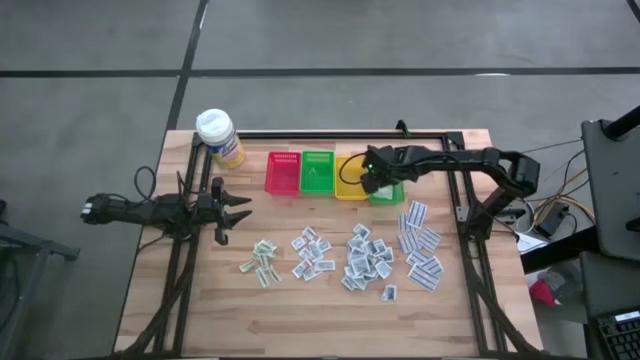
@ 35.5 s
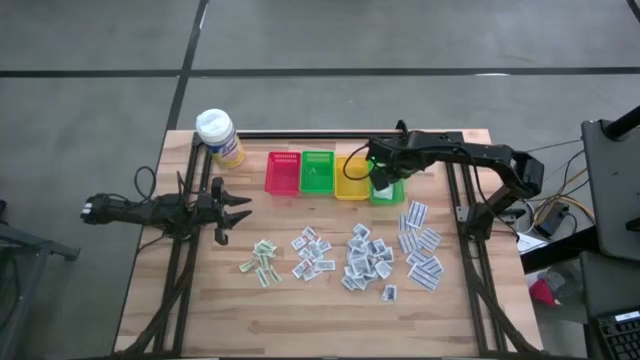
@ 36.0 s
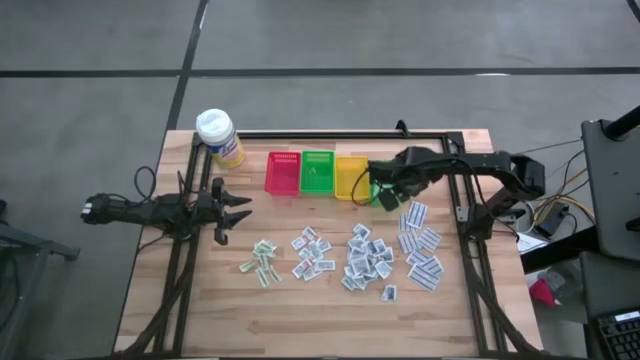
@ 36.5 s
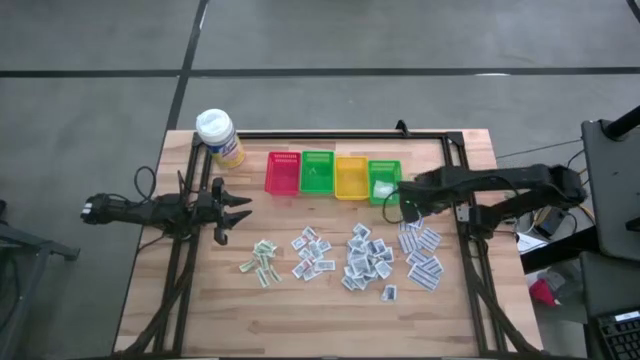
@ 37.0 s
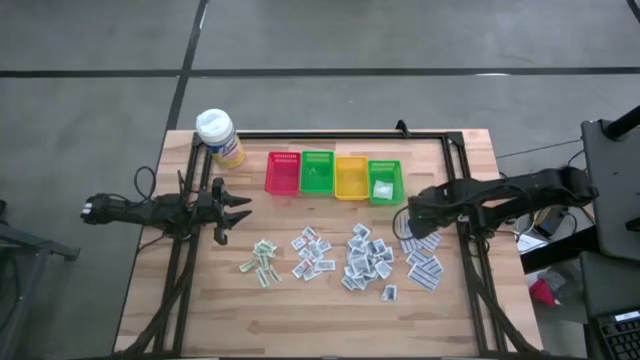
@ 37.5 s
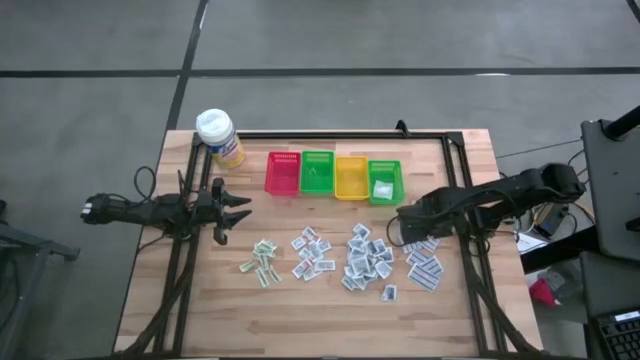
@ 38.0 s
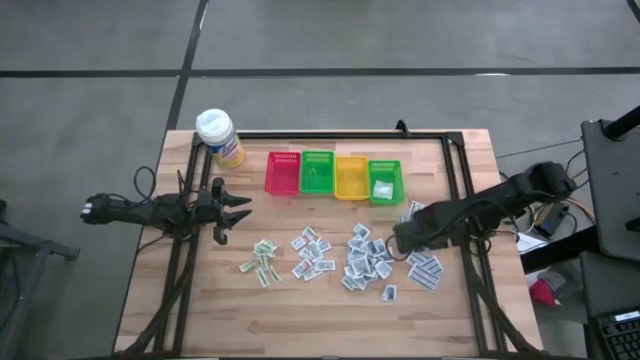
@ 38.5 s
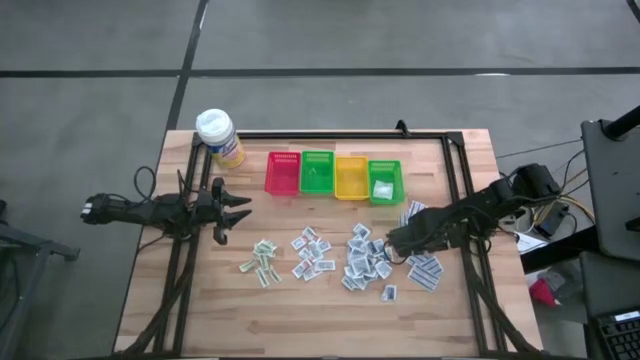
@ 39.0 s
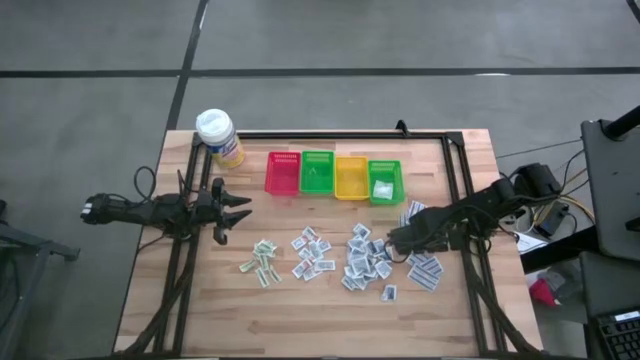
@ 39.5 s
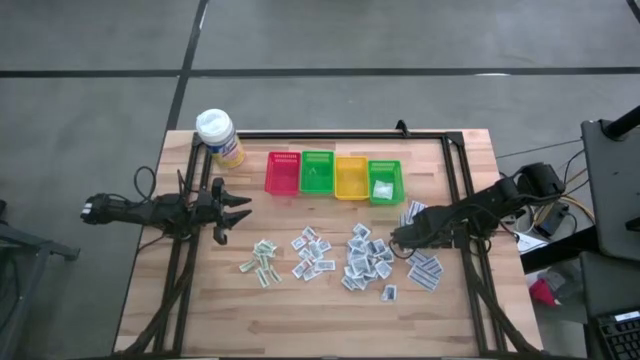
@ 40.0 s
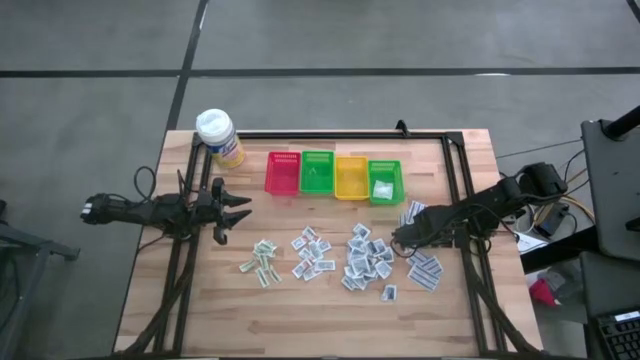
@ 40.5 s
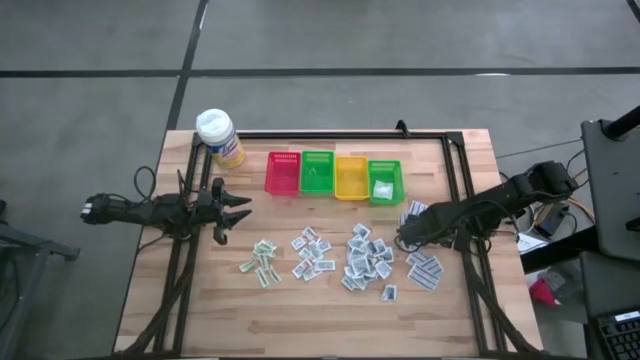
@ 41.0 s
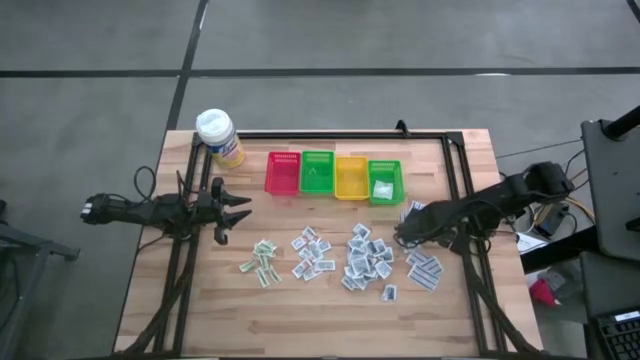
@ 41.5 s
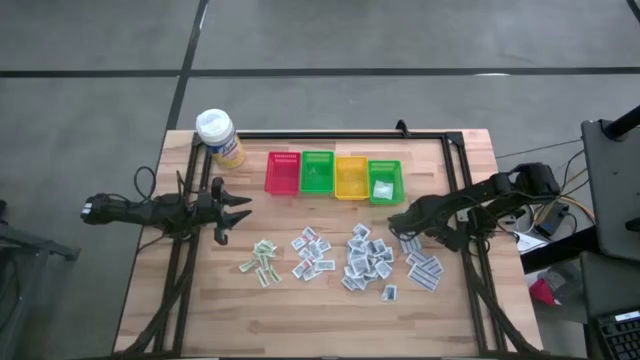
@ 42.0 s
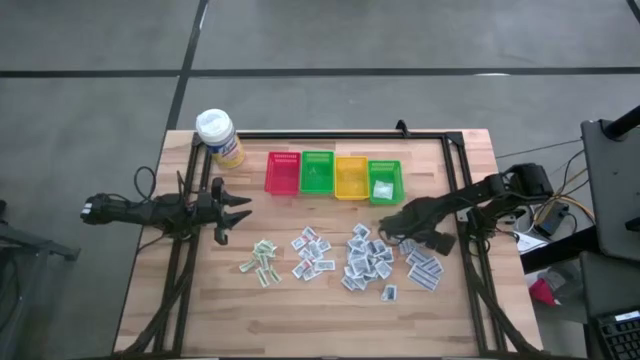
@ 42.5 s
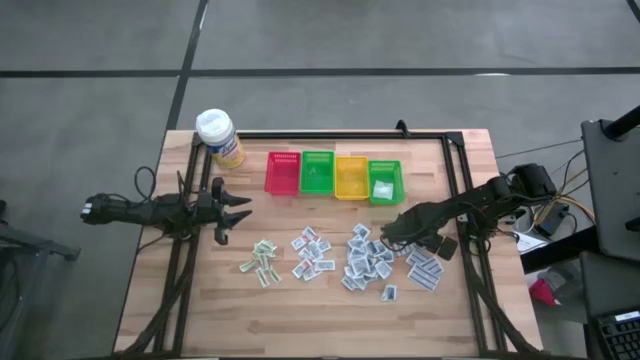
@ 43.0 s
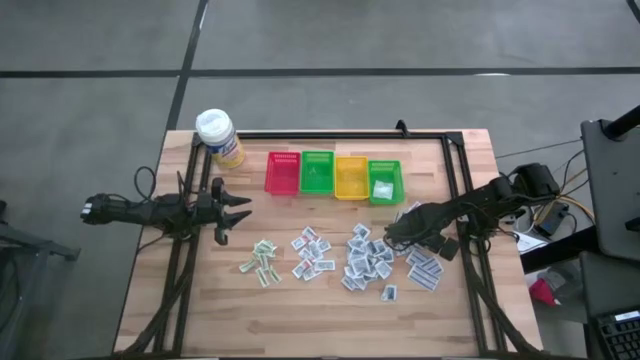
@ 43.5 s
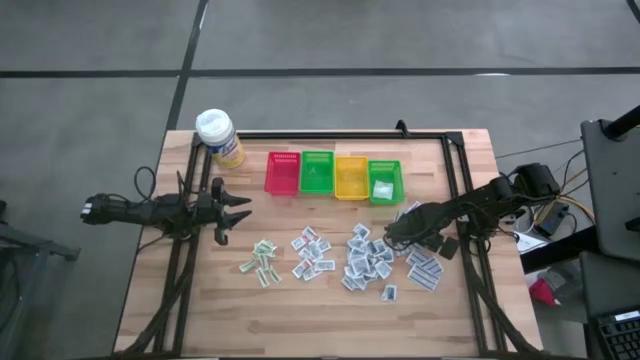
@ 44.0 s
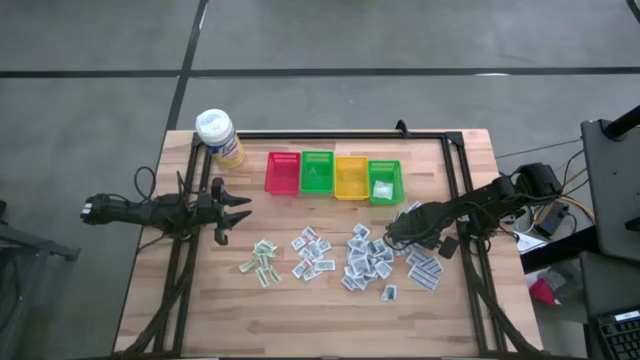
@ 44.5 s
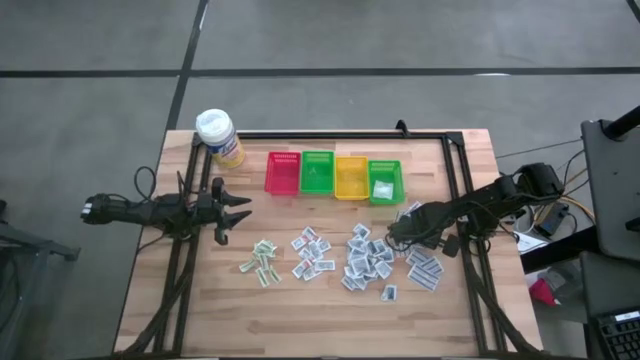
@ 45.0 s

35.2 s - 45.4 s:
Task: Pick & Place First Aid Supplies
Put the blue bandage into the right green bin

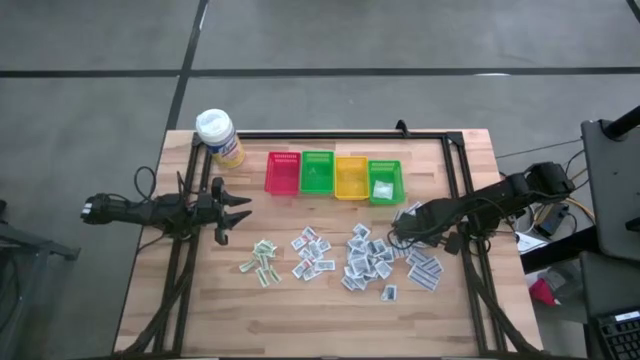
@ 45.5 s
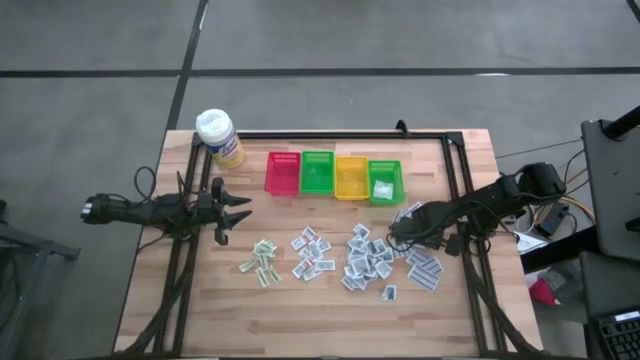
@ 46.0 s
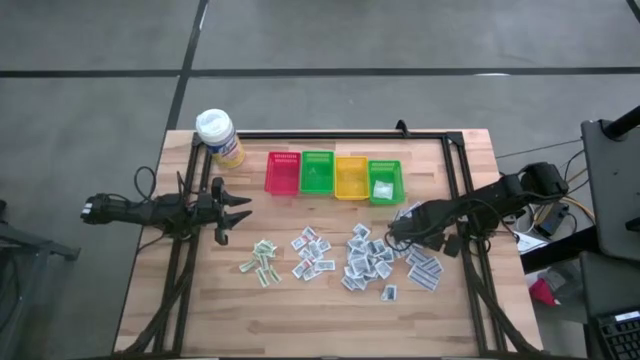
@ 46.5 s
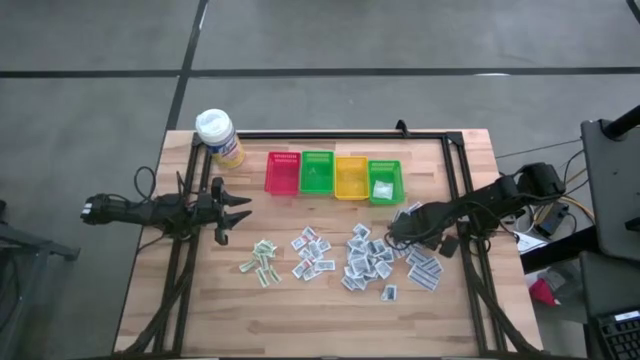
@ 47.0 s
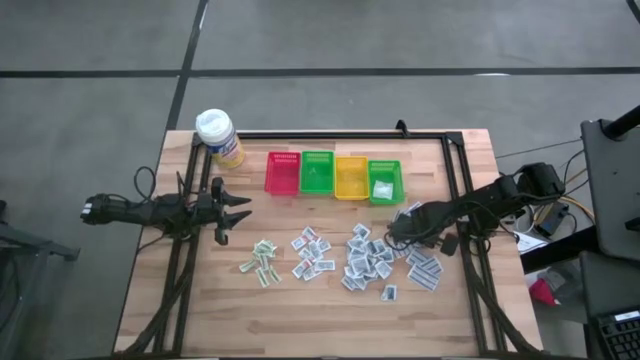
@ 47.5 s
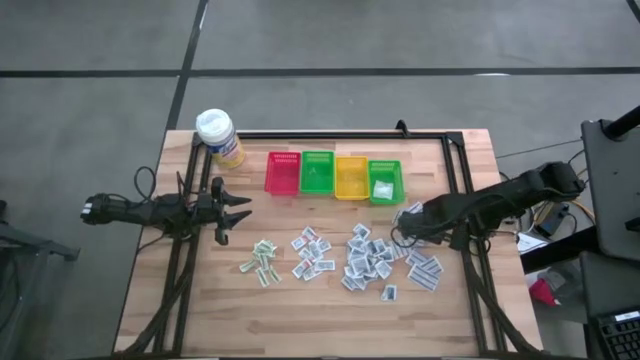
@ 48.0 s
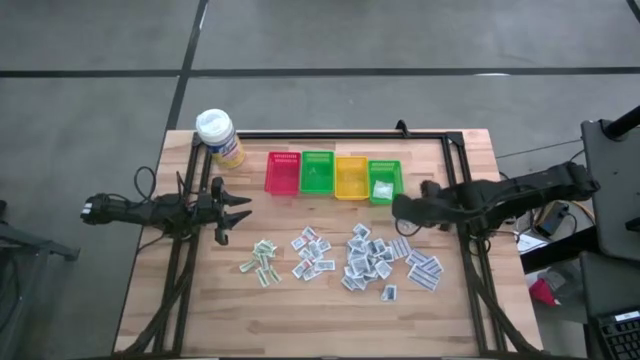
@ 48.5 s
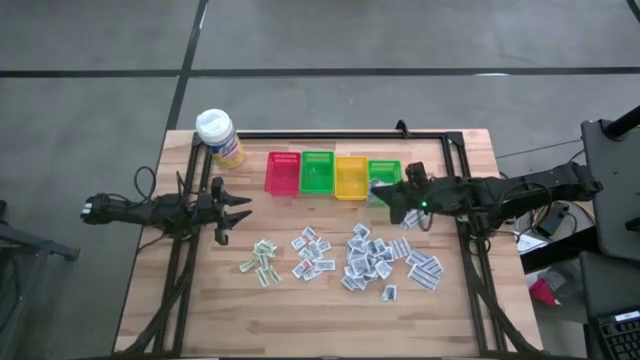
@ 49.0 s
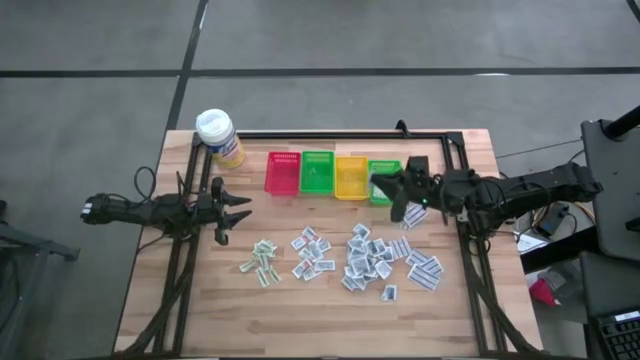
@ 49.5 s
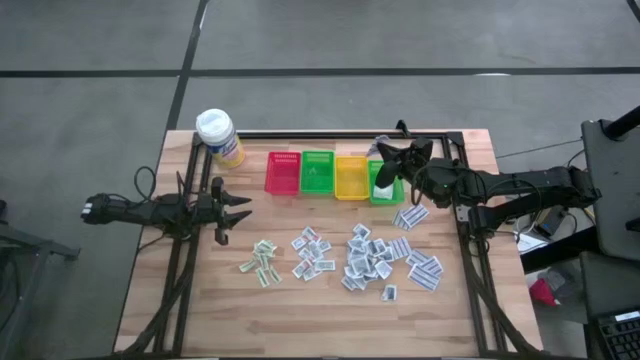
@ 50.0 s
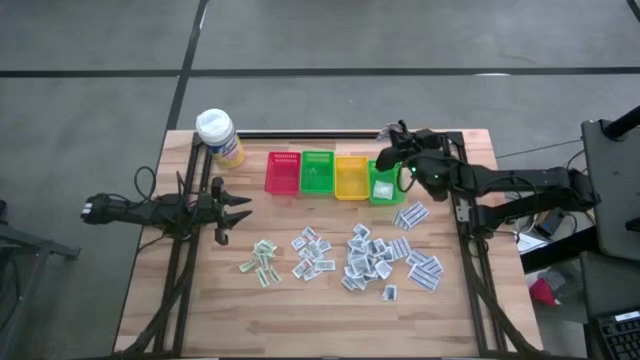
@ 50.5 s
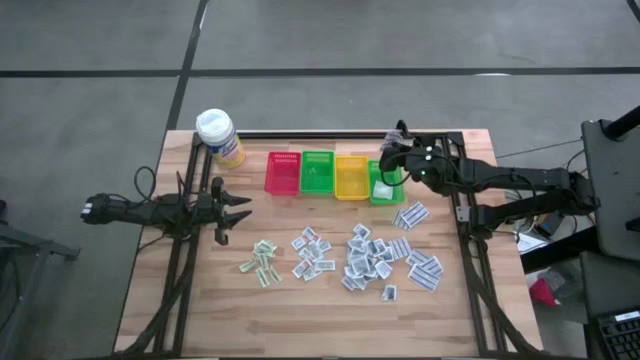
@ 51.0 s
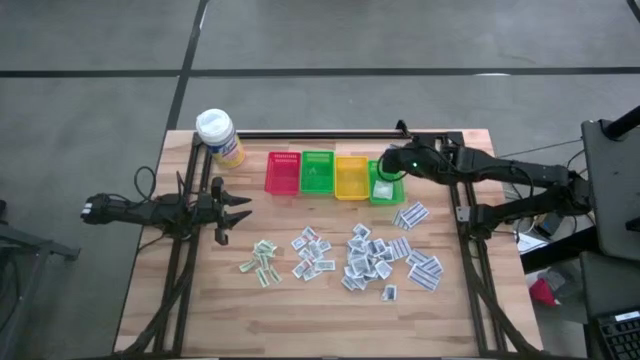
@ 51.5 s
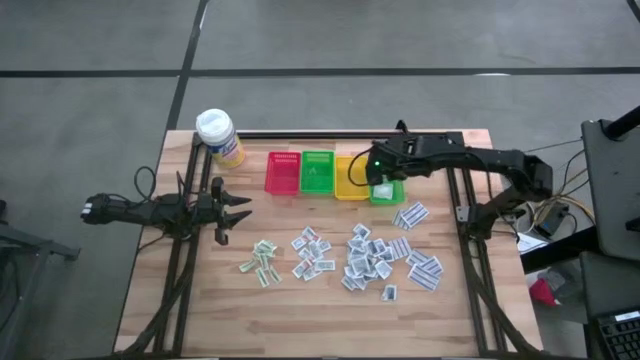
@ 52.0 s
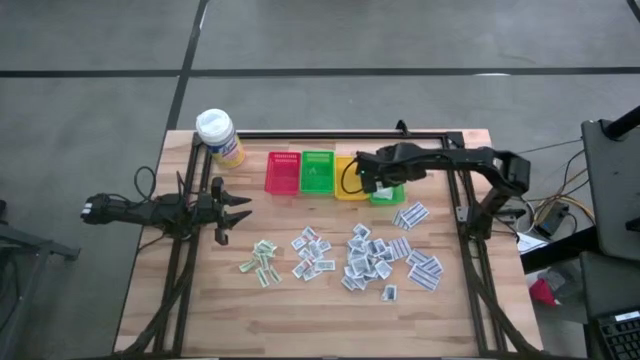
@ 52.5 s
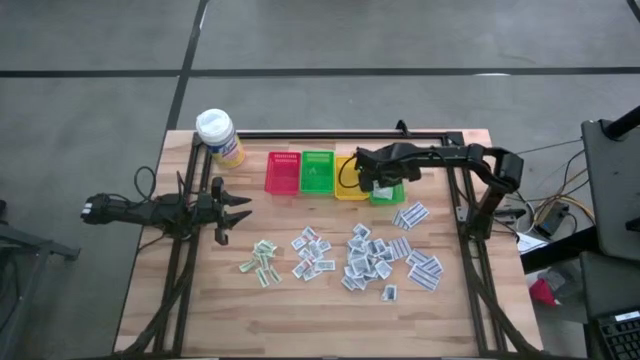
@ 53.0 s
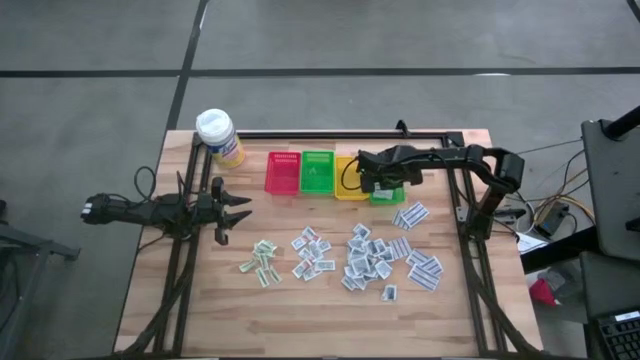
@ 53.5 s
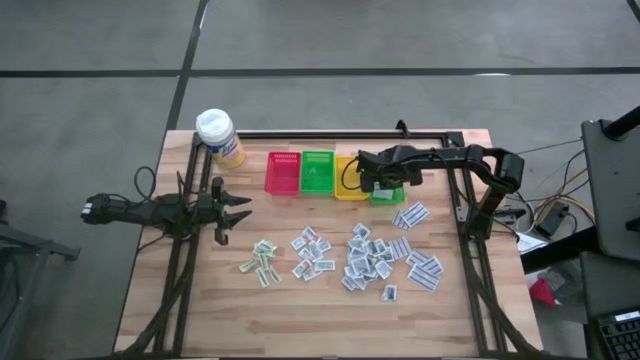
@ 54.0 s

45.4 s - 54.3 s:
Put the blue bandage into the right green bin
